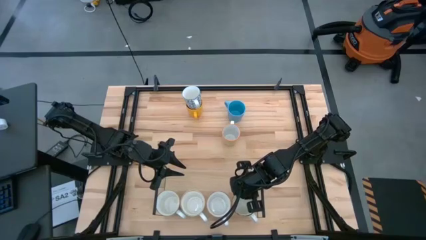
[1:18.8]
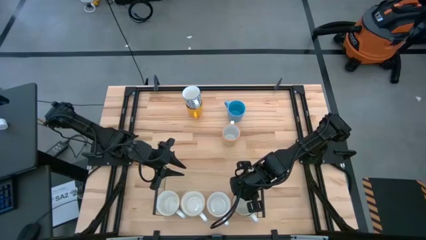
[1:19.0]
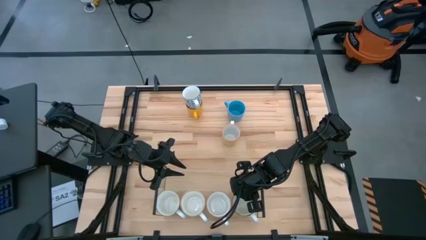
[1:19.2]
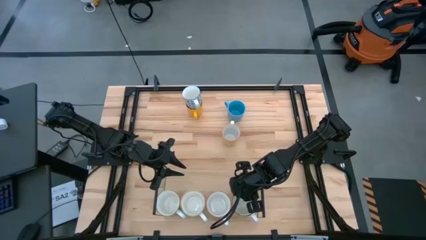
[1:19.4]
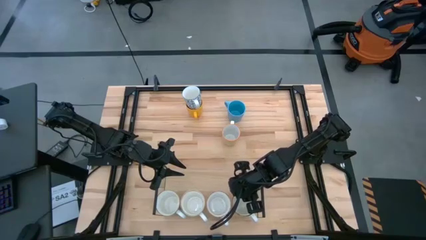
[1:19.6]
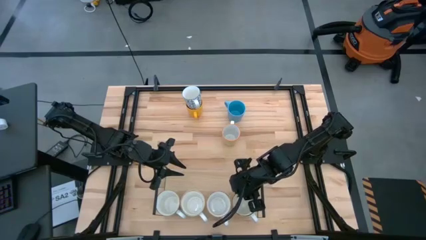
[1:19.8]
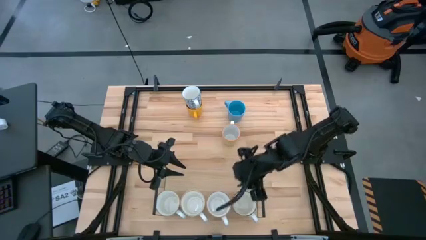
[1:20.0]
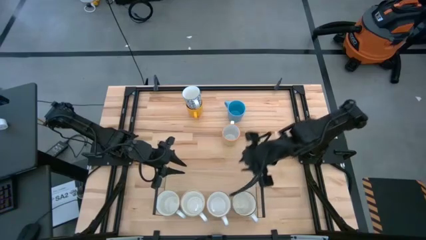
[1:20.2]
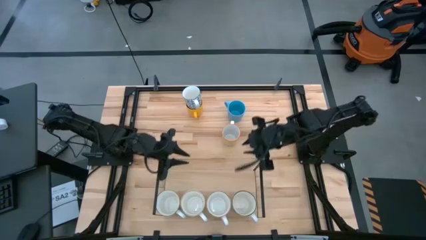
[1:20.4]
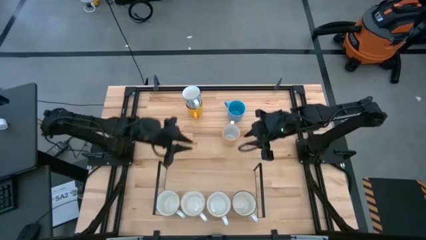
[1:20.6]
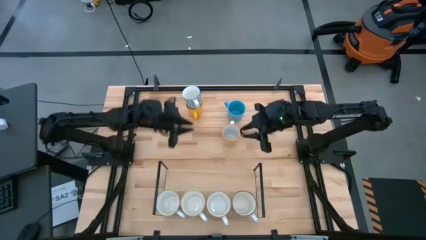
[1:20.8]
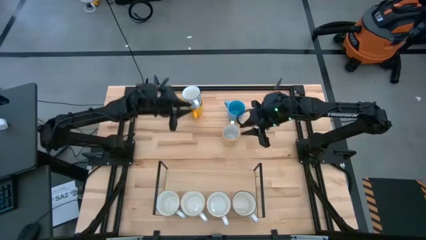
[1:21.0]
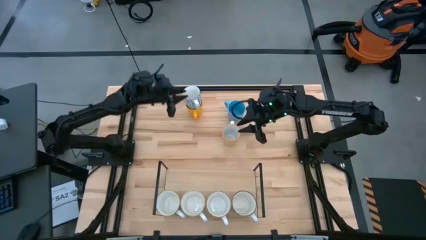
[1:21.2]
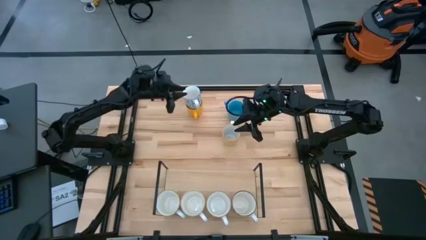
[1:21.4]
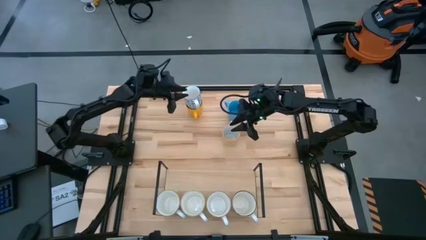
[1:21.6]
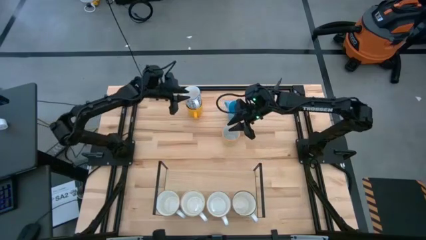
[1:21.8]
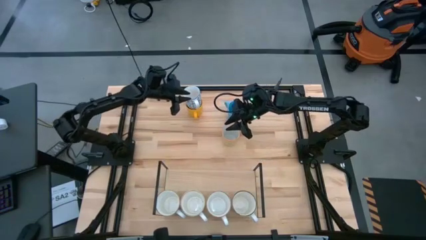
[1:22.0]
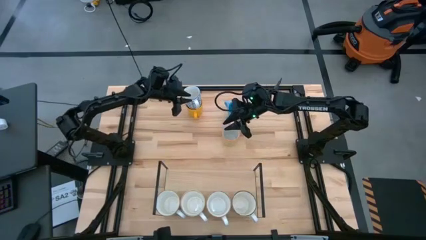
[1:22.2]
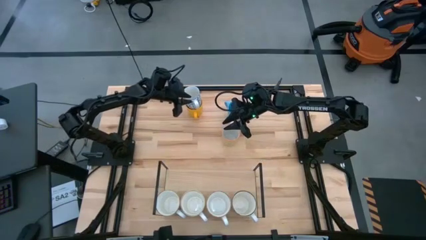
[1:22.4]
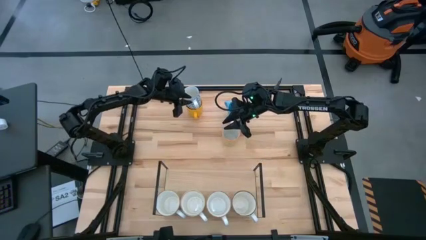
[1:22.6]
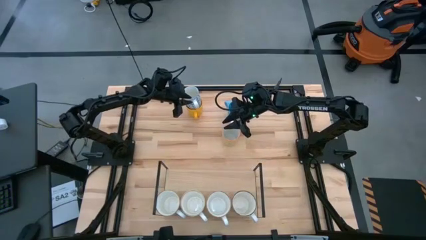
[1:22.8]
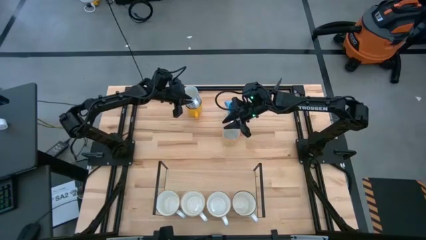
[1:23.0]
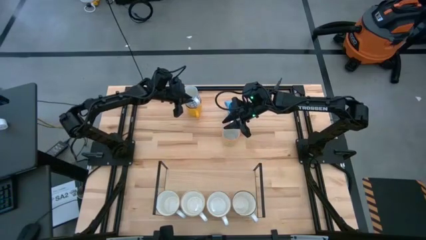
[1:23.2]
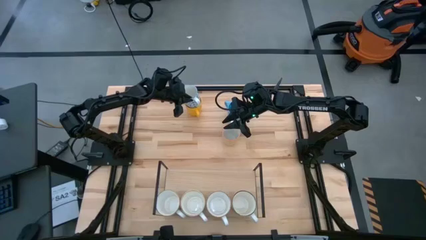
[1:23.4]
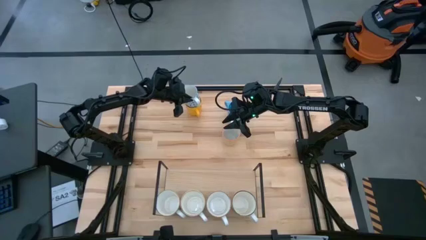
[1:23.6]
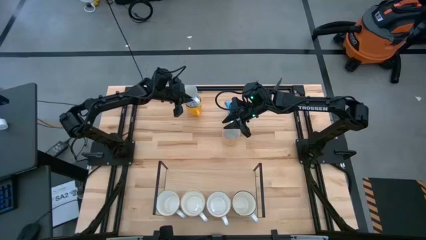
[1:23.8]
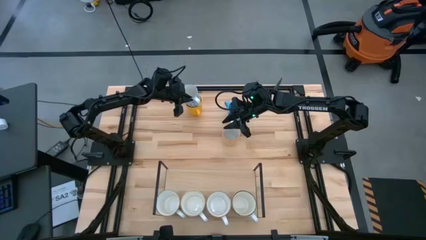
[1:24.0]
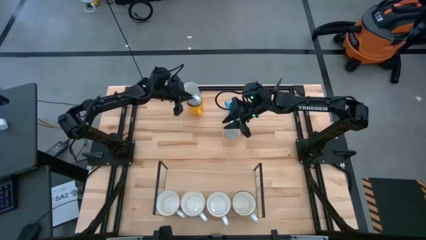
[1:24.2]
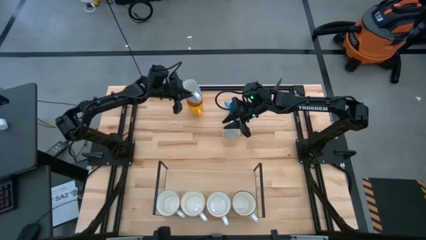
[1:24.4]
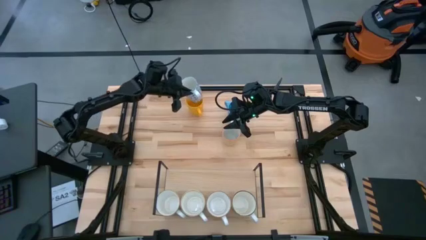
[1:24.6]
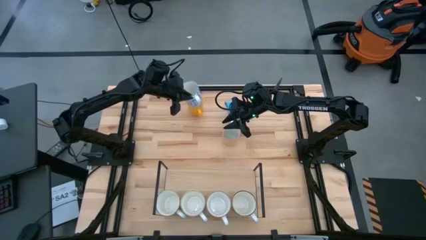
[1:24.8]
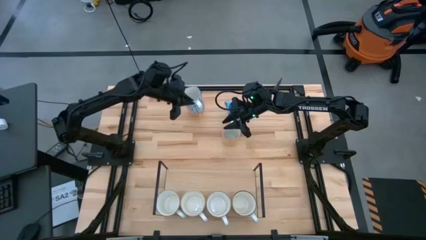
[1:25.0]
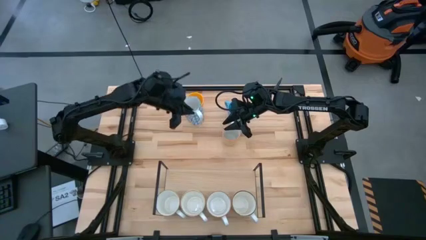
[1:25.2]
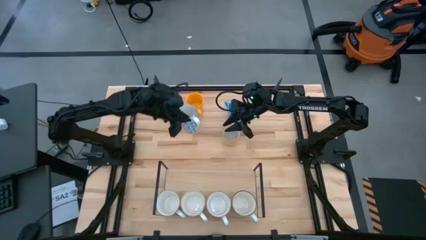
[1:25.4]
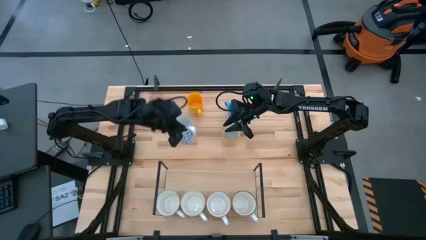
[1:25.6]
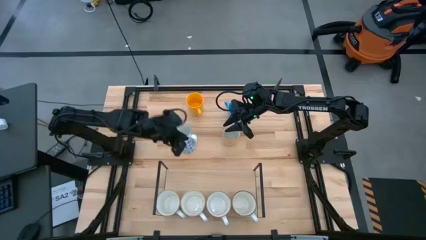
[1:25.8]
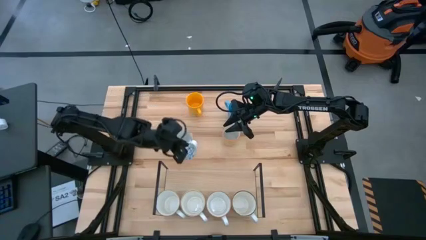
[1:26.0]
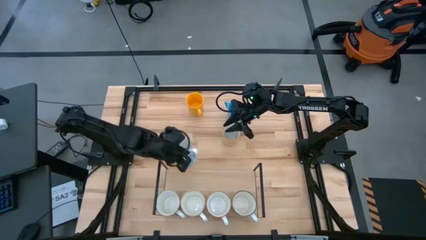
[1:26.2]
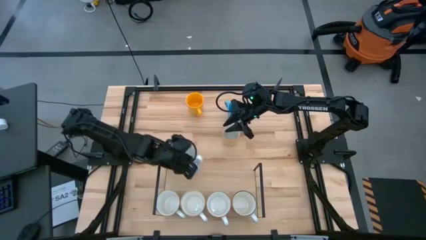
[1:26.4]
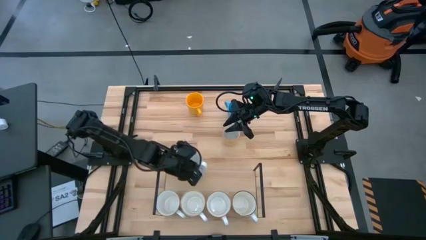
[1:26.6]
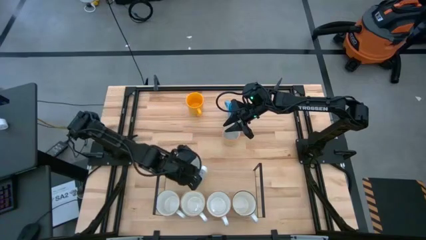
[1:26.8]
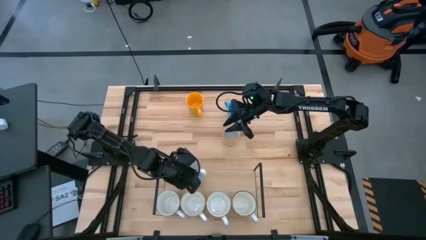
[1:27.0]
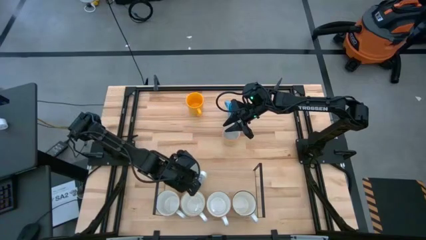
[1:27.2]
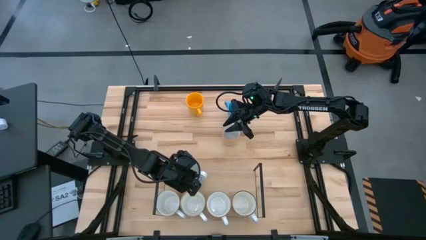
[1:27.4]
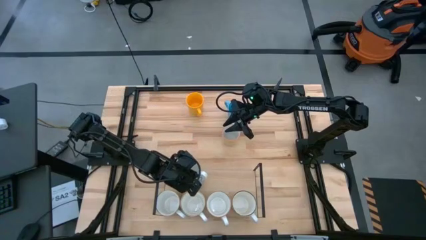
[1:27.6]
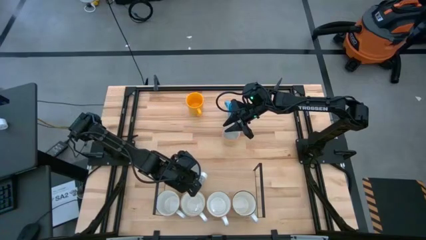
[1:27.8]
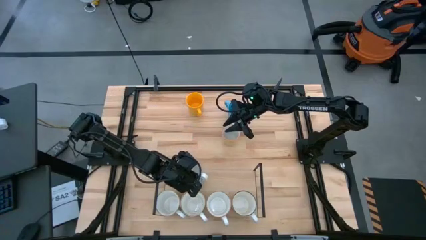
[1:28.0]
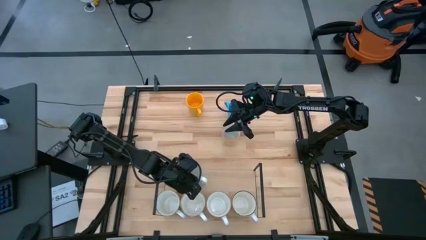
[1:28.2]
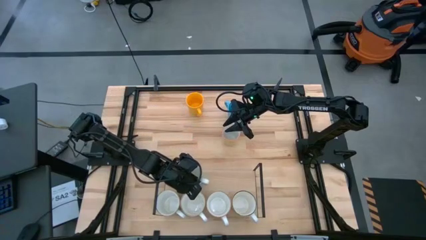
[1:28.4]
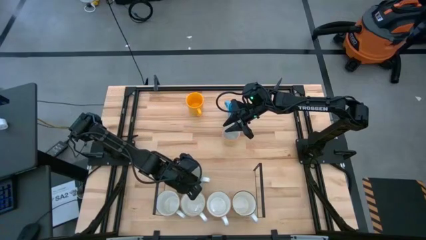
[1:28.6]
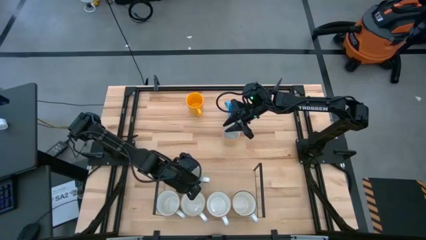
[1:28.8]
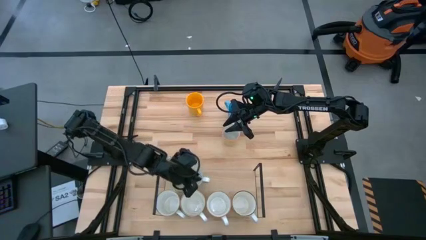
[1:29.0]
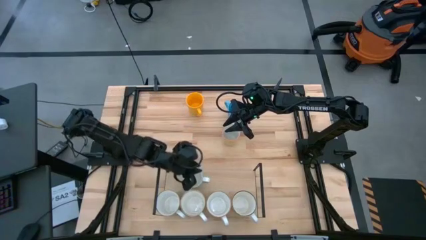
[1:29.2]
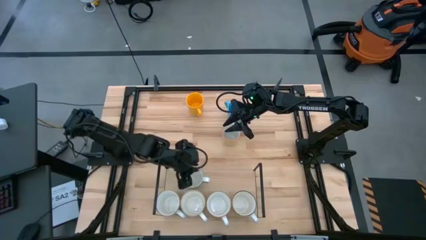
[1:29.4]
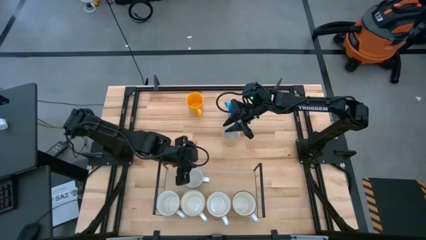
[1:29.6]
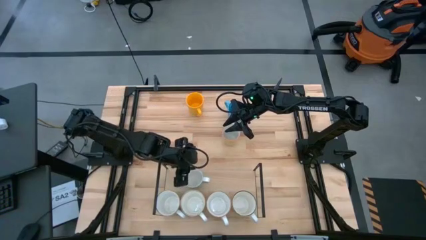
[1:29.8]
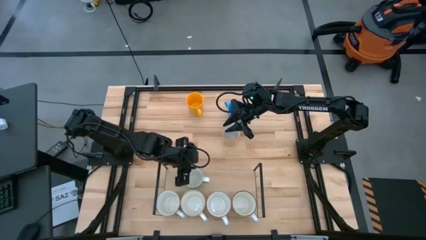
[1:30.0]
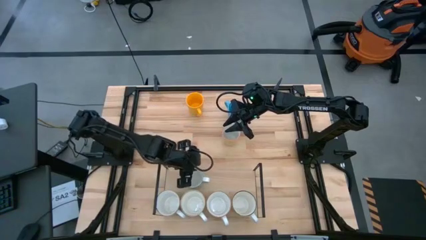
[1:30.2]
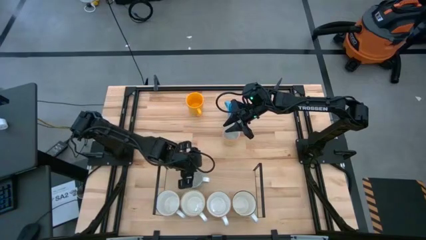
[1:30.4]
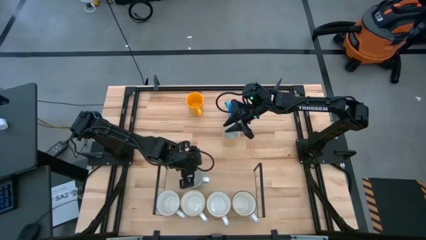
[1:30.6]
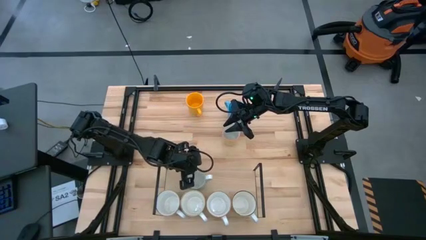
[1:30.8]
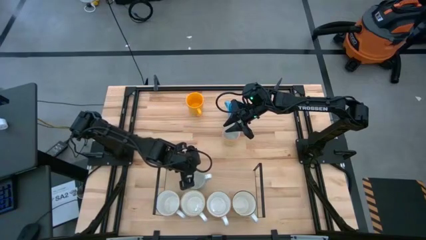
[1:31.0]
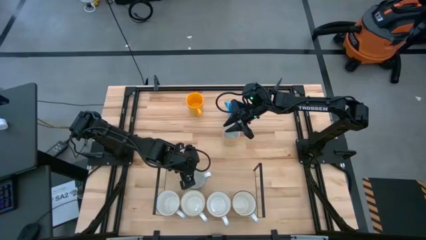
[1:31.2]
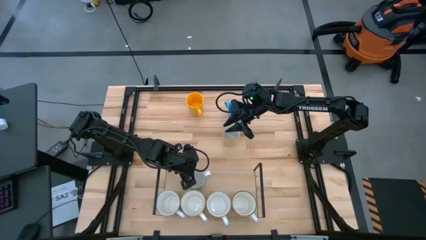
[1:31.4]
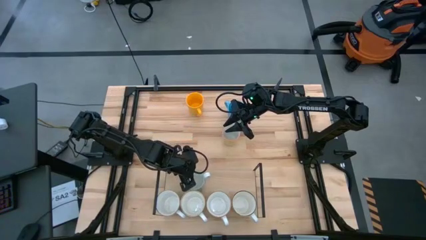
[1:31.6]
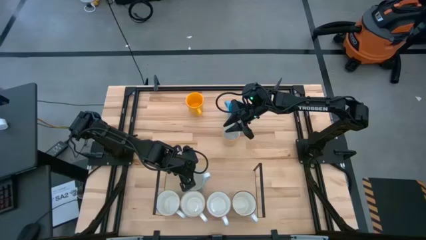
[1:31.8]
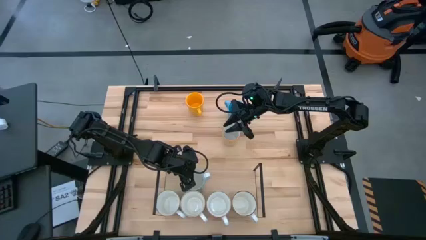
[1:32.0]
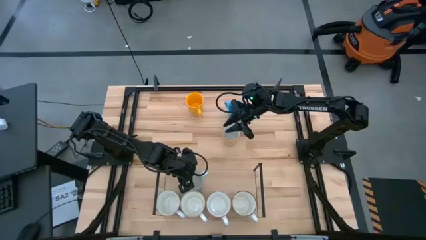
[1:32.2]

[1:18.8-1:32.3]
Task: Place coffee mugs
Put the blue patterned mug on the shelf
